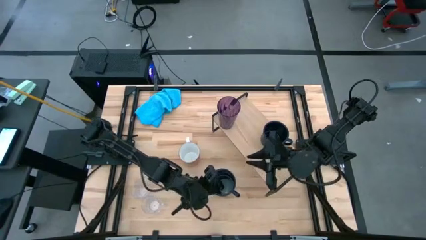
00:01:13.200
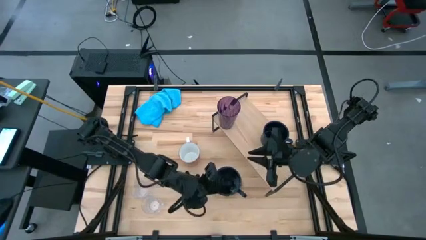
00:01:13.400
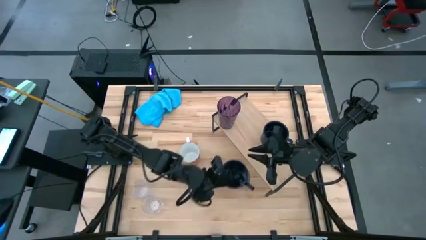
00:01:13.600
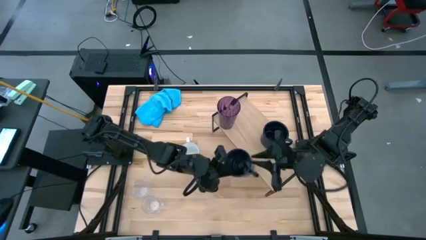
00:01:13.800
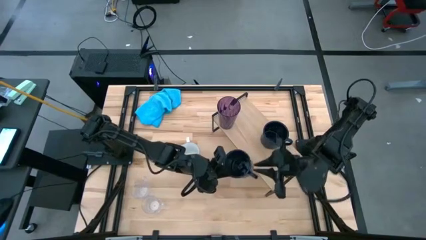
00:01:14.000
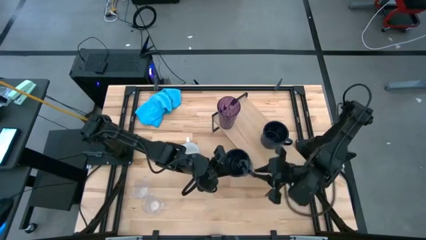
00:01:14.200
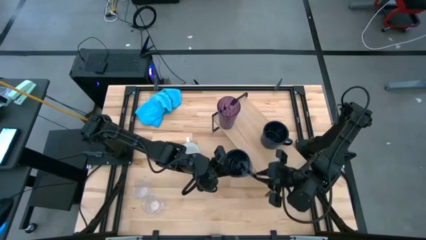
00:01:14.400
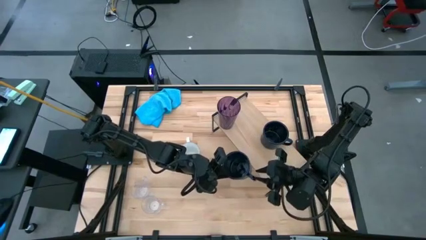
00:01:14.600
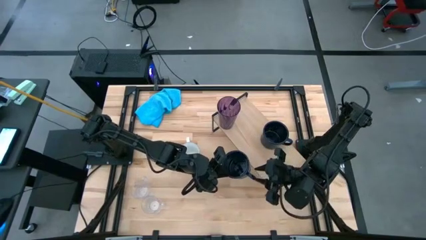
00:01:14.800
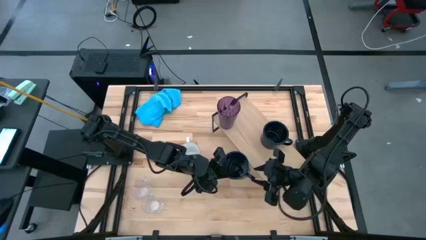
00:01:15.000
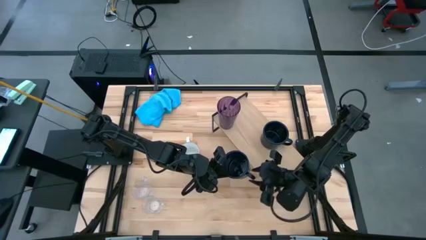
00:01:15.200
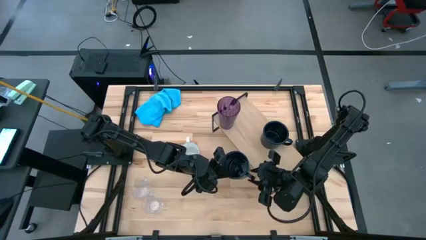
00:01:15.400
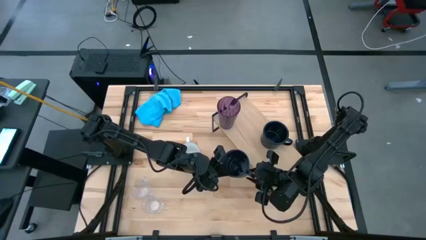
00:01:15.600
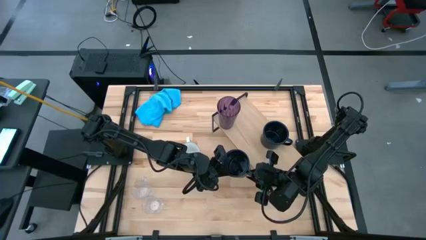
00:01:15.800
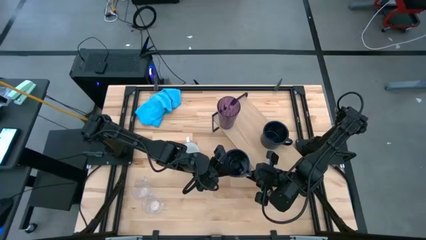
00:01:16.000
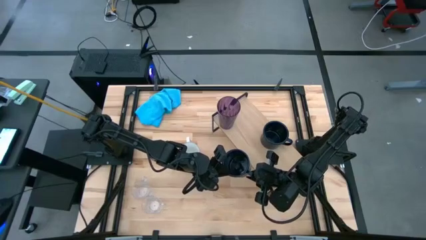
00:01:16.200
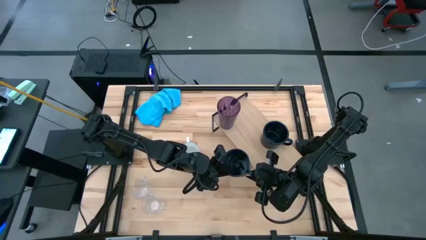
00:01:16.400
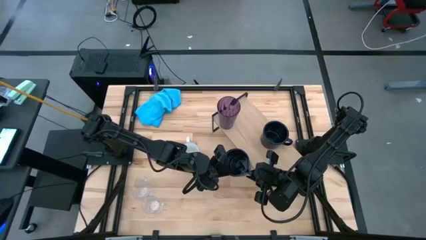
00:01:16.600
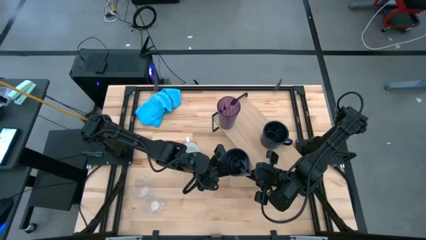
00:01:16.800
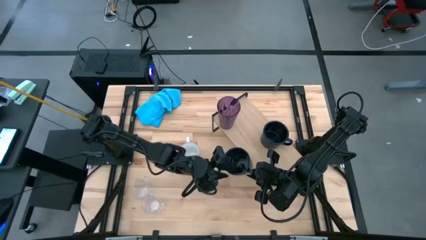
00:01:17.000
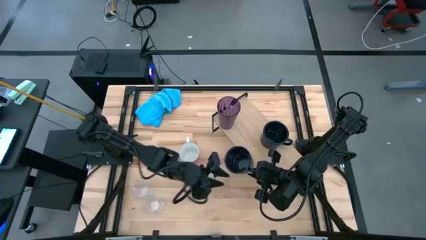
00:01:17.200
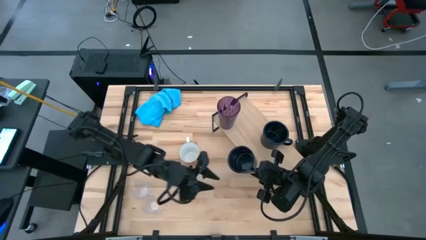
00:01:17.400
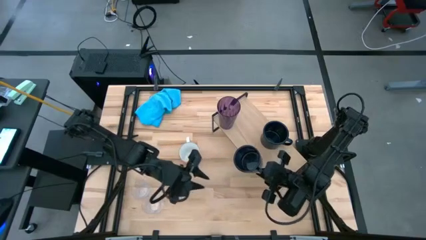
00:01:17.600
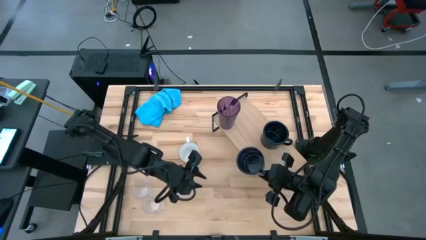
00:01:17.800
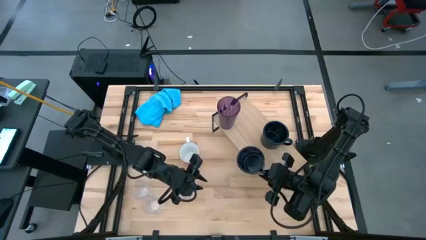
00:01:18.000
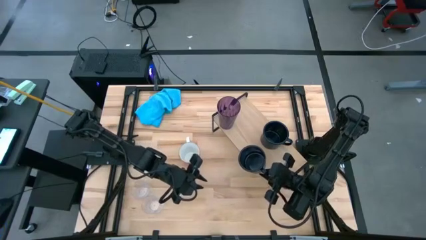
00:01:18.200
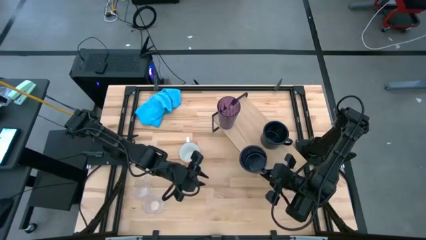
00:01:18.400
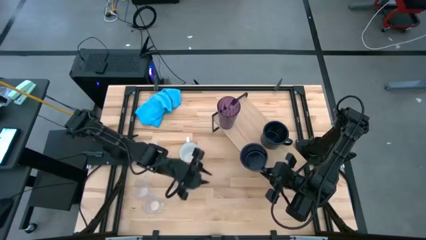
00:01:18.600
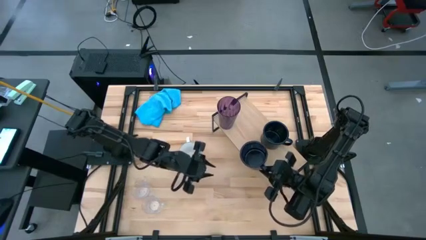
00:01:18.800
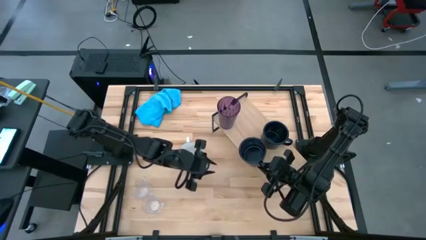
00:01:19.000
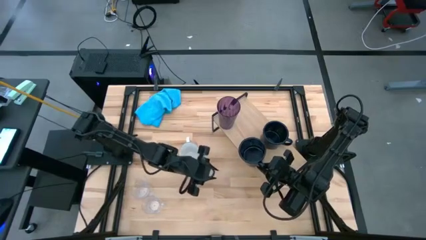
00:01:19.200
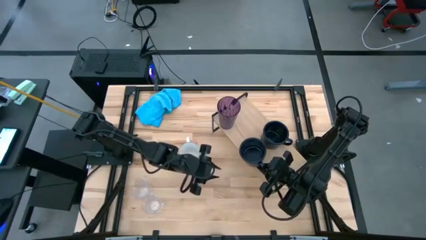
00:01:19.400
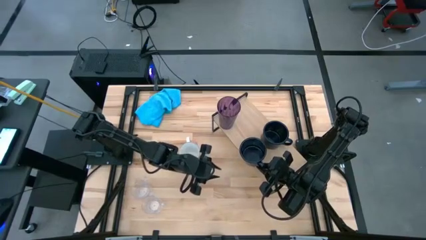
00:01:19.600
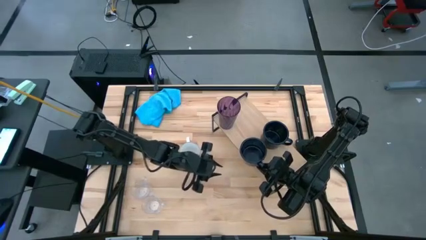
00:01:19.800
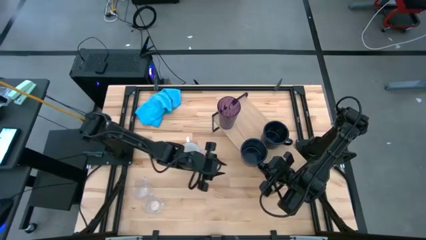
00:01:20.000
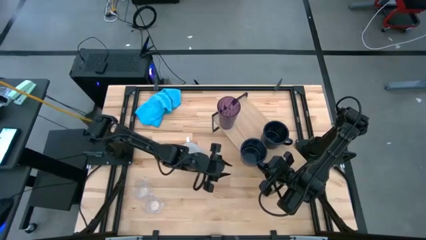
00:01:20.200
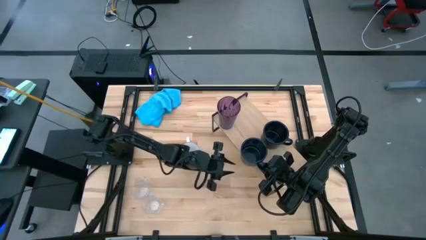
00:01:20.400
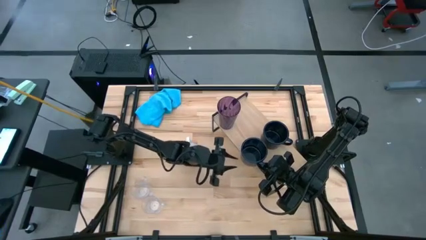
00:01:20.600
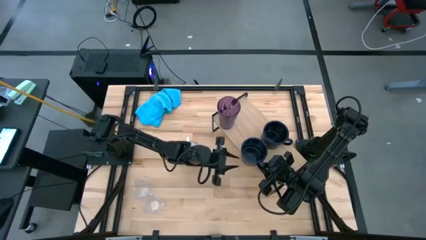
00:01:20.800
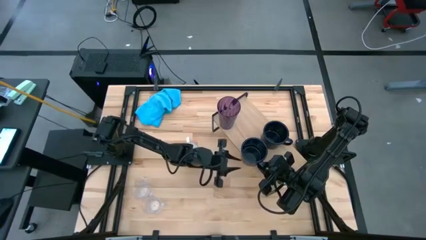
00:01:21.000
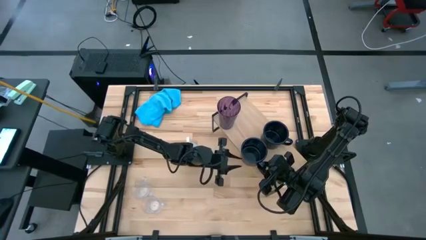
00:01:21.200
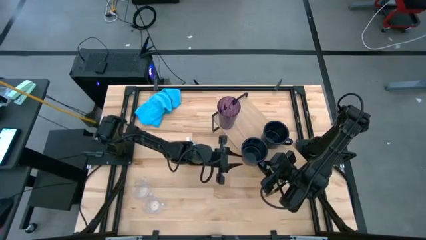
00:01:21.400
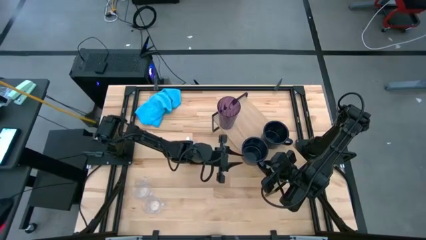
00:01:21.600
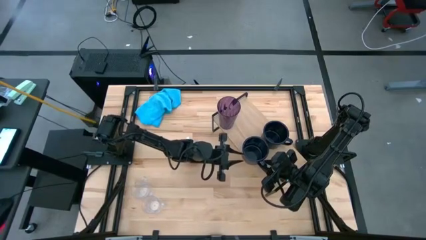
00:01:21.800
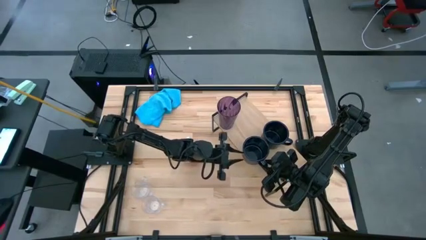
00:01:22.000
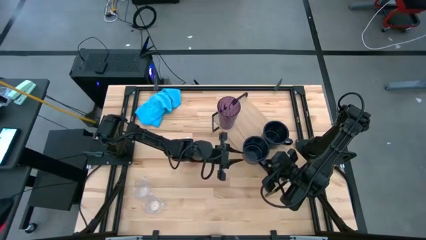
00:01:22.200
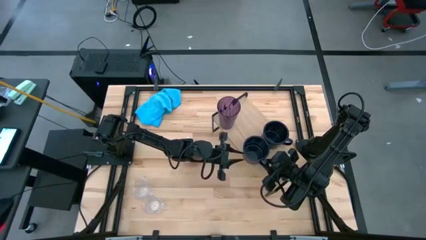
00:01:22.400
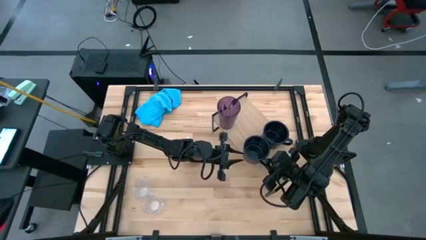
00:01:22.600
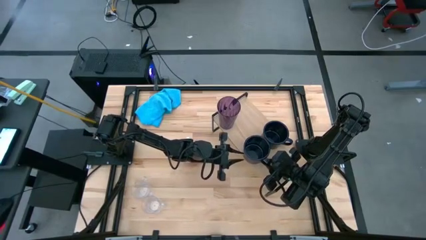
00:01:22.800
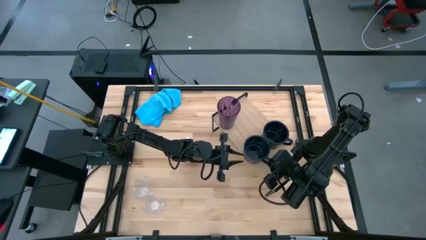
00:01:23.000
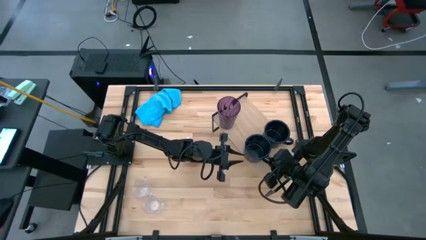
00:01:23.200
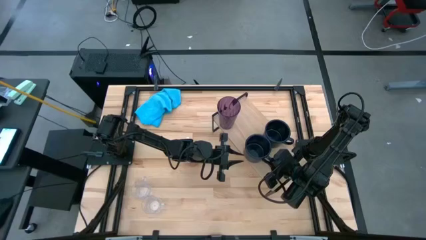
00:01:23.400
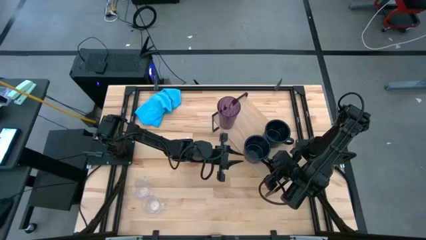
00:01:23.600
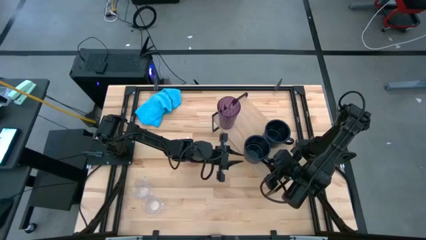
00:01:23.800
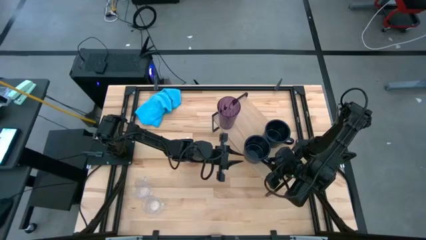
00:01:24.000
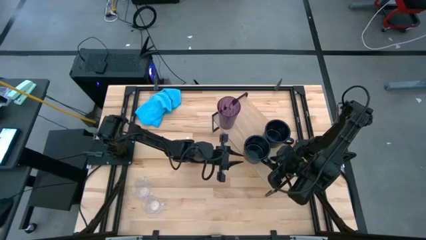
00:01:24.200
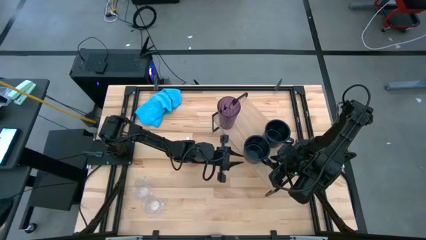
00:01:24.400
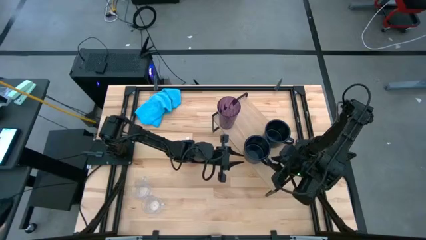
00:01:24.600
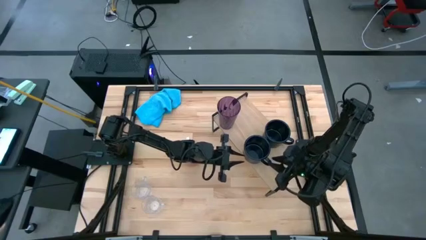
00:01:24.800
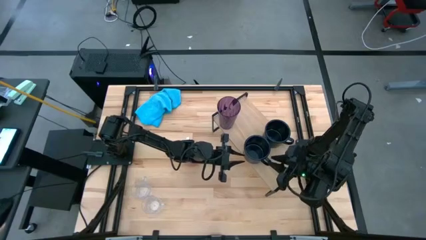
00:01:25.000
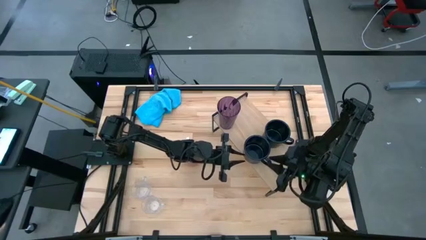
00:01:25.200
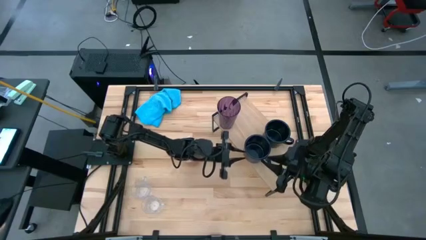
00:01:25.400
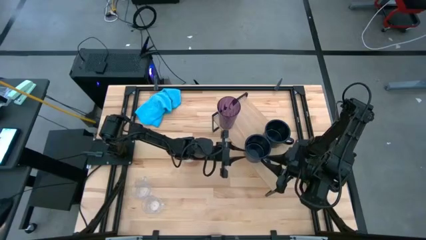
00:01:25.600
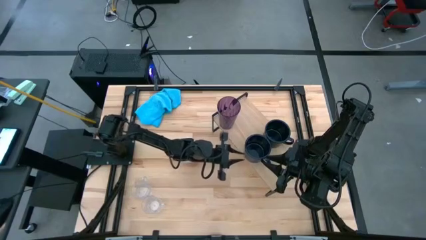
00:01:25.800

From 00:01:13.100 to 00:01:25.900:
Task: Stack small to large cups/mugs on shelf
Put the black mug on the shelf aligned with the other black mug

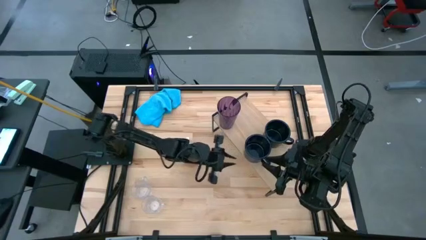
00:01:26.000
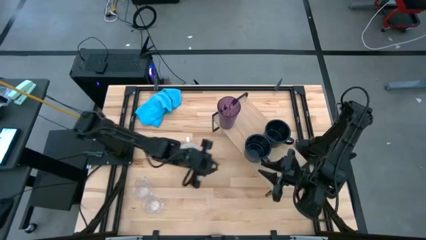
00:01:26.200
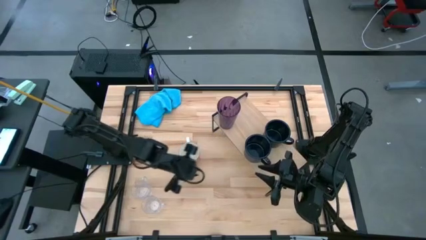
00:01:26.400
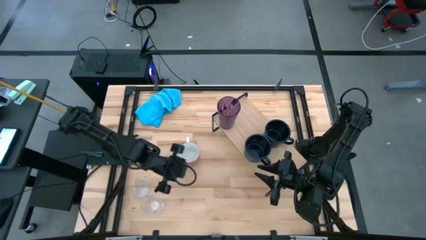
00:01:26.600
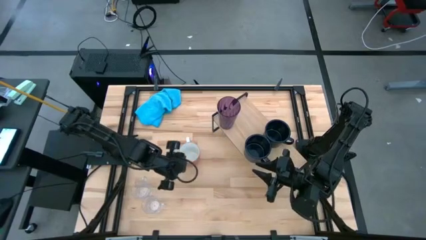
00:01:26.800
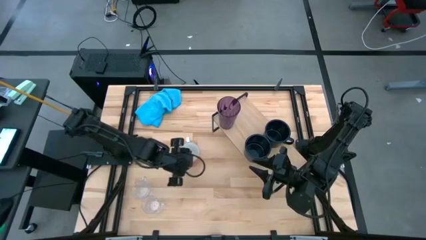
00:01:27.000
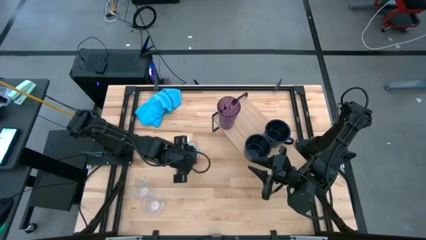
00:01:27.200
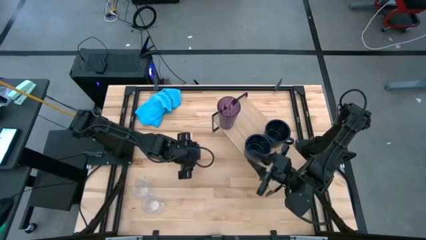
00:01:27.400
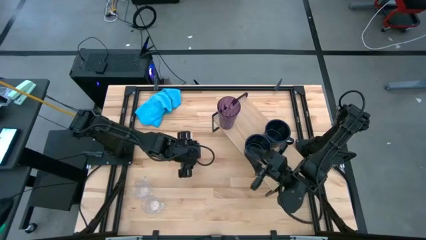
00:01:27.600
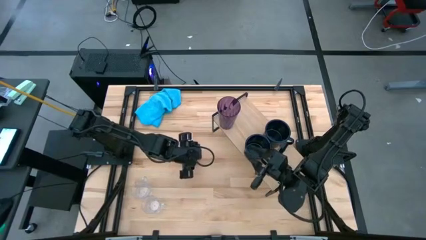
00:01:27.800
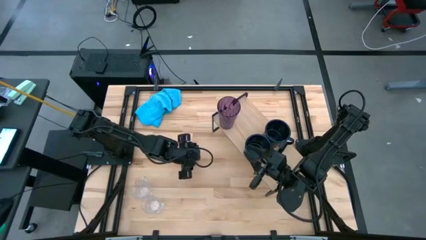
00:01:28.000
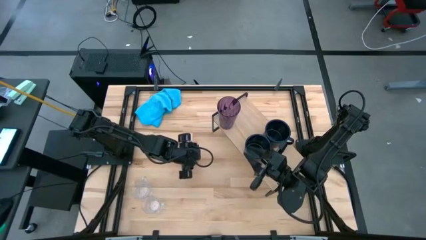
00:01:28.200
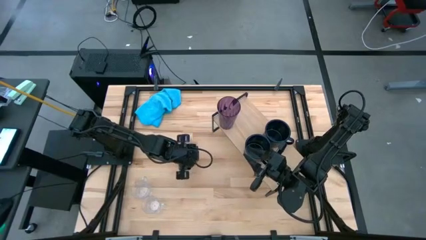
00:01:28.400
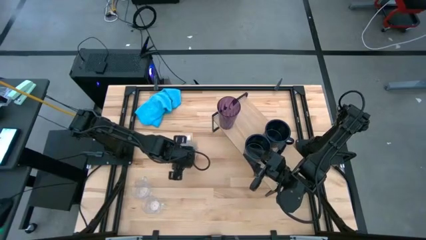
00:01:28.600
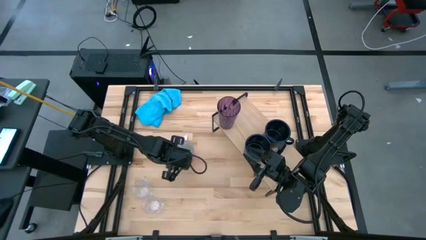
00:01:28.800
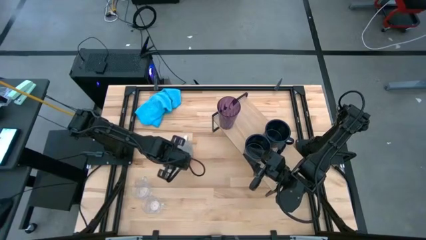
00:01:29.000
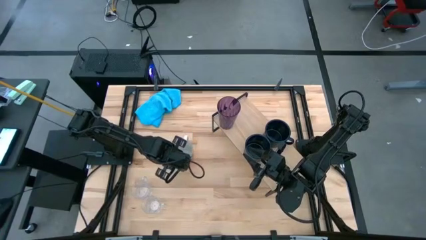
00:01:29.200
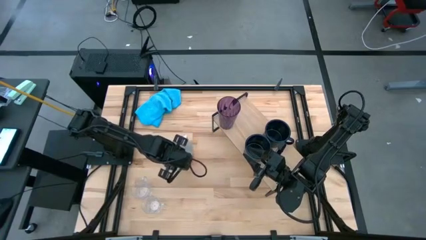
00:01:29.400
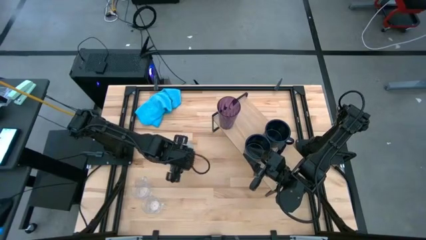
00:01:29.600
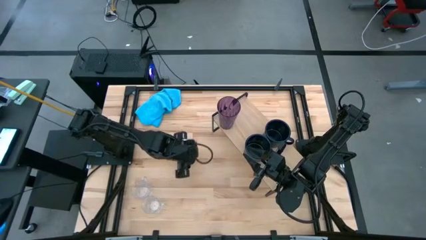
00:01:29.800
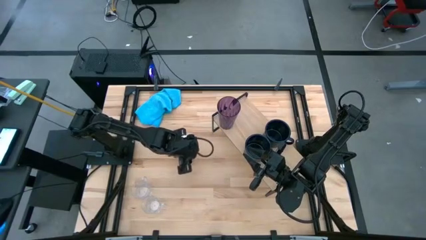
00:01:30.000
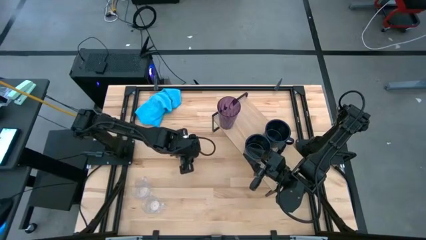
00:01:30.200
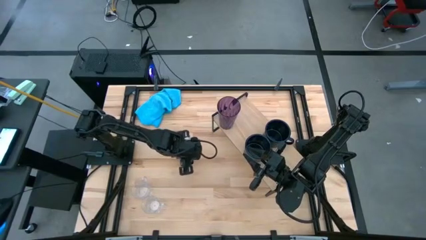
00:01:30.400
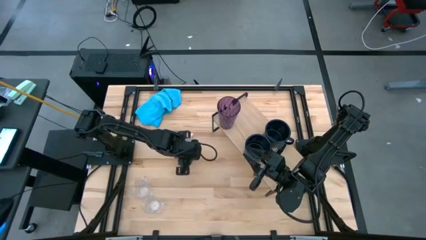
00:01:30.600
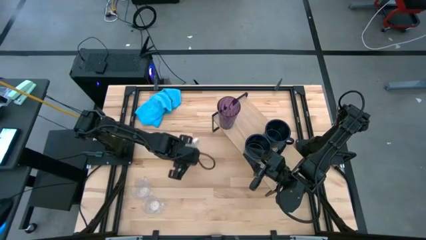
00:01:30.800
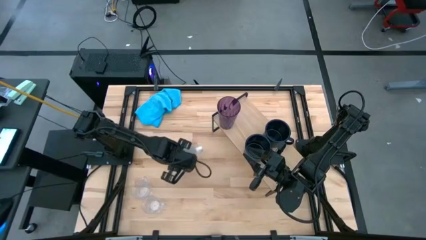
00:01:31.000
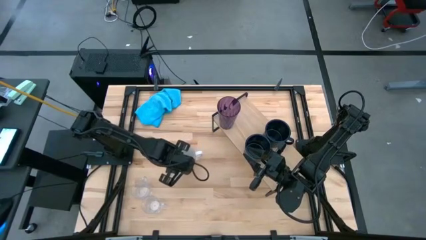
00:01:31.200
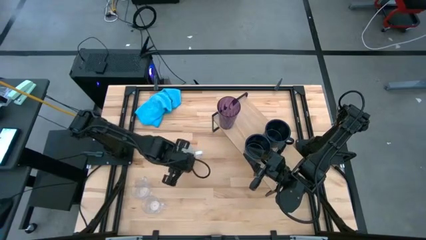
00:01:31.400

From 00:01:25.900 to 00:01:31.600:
Put the orange mug on the shelf
